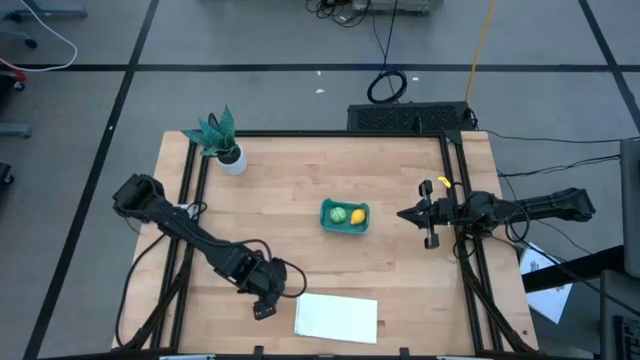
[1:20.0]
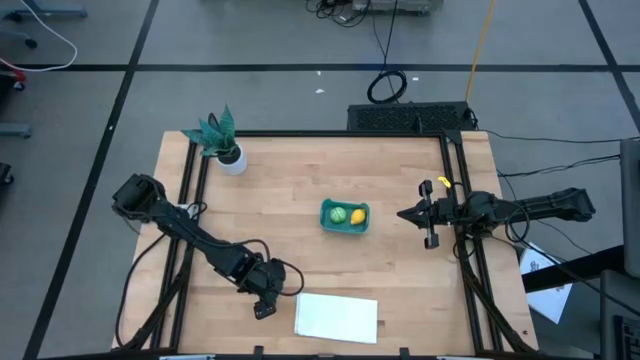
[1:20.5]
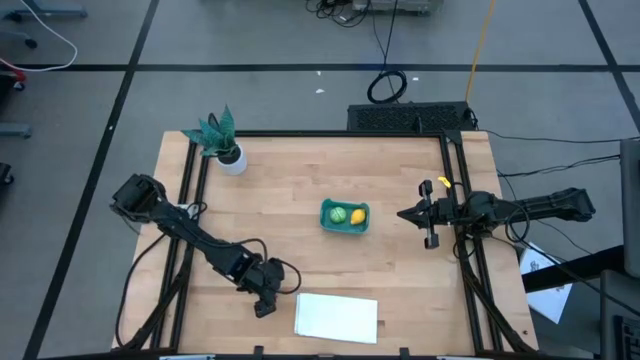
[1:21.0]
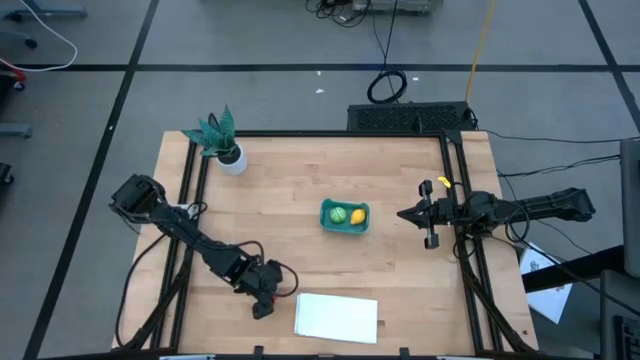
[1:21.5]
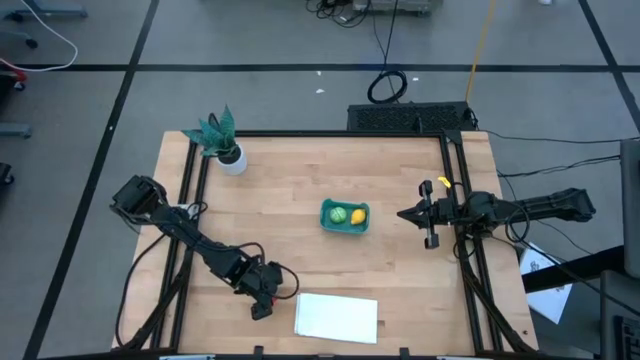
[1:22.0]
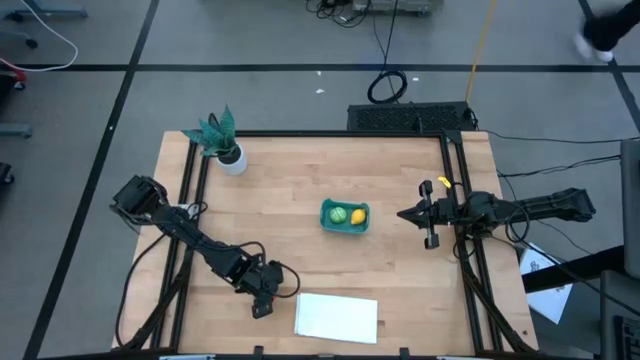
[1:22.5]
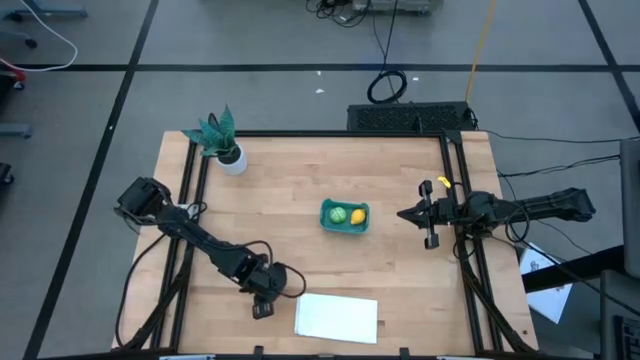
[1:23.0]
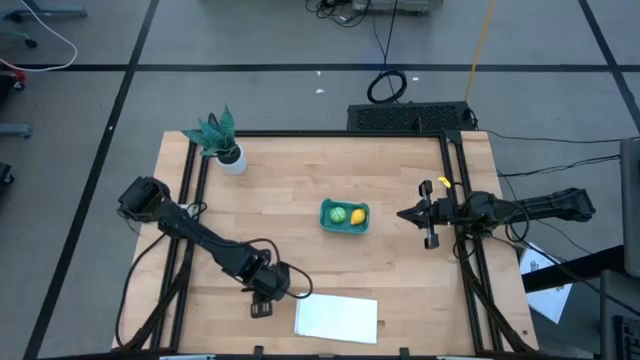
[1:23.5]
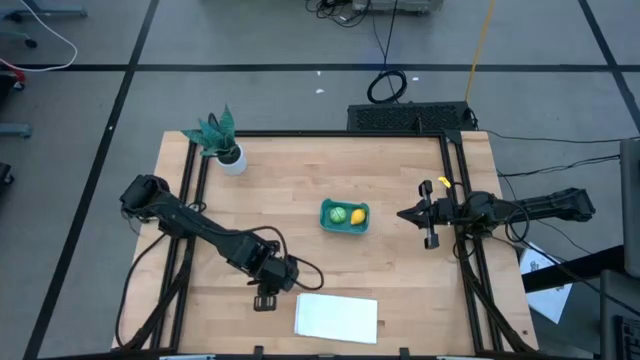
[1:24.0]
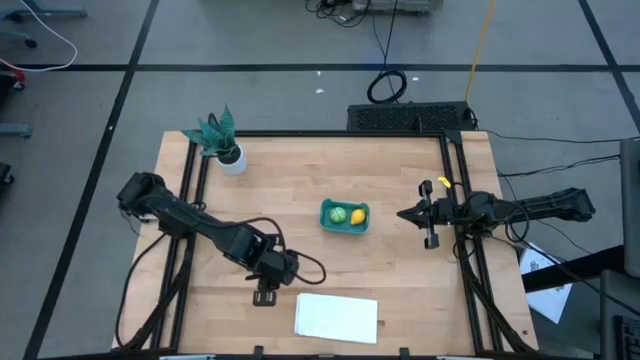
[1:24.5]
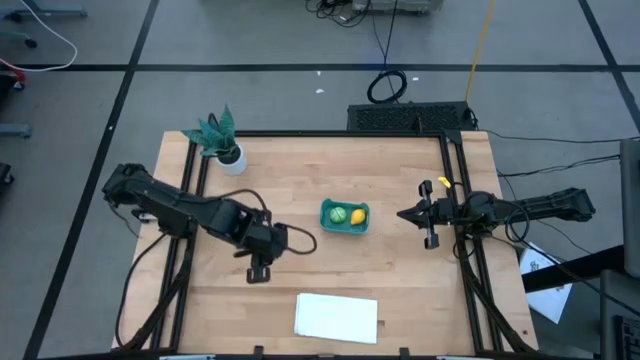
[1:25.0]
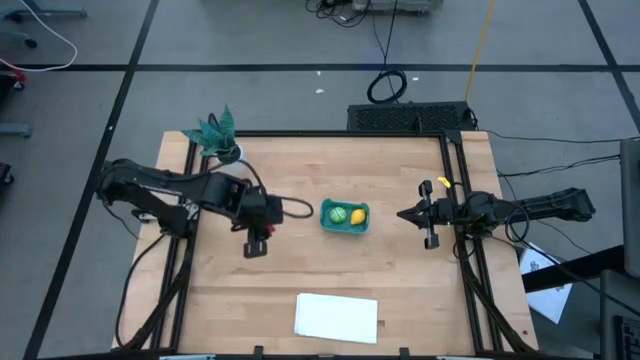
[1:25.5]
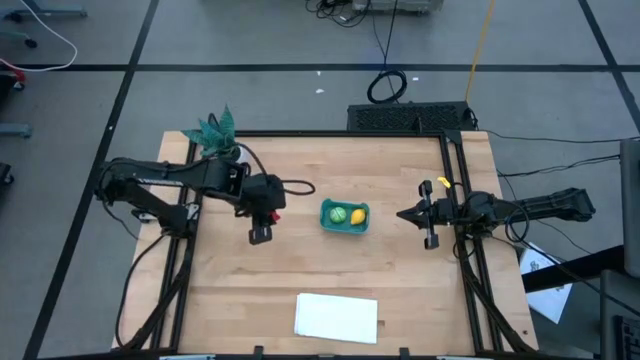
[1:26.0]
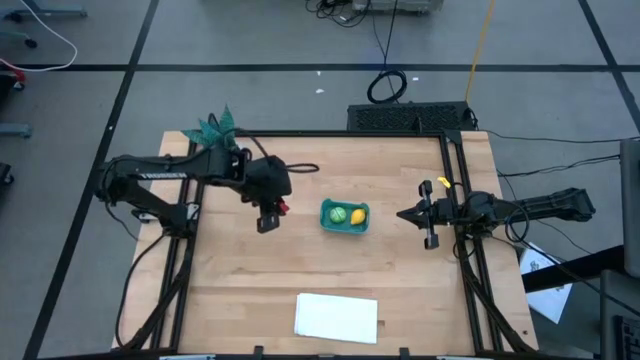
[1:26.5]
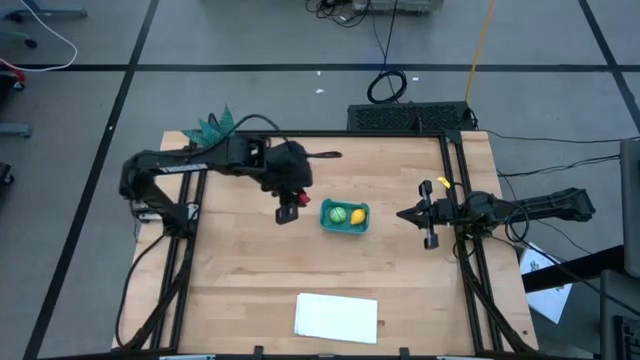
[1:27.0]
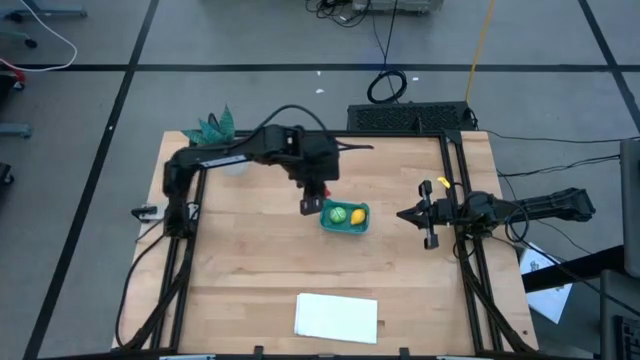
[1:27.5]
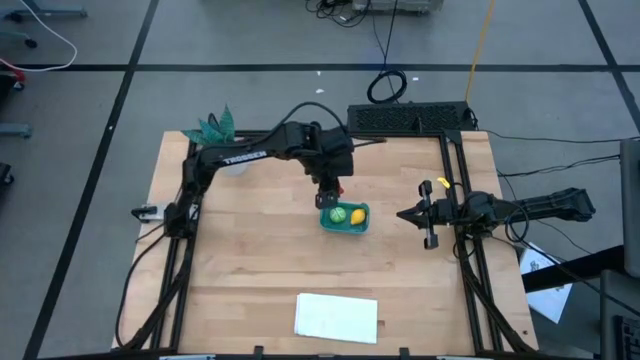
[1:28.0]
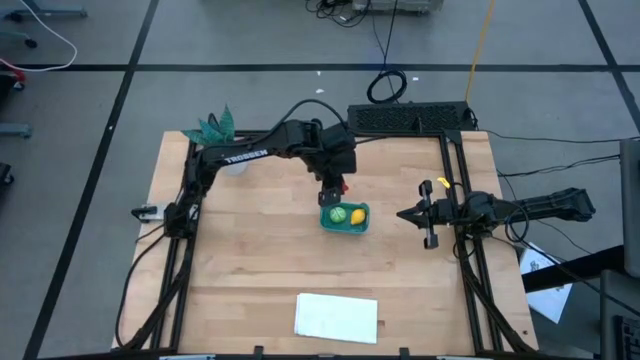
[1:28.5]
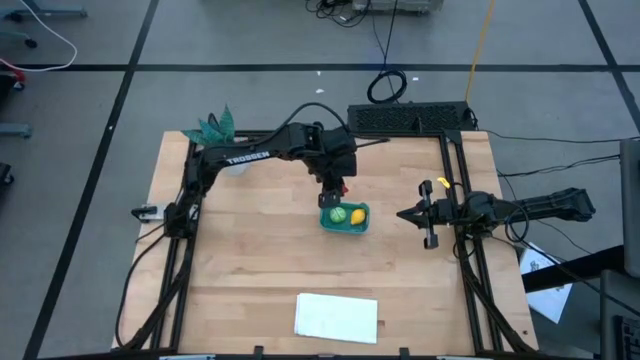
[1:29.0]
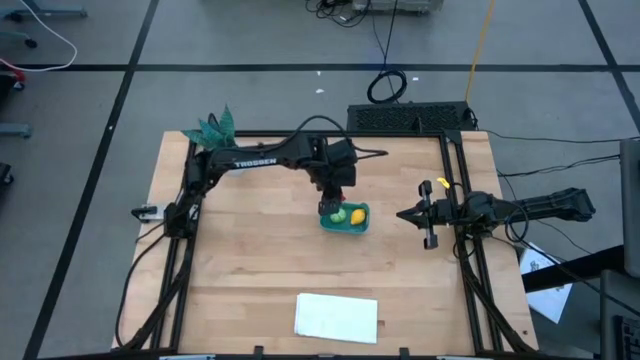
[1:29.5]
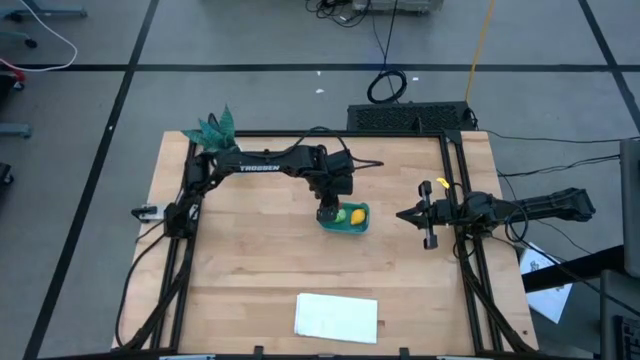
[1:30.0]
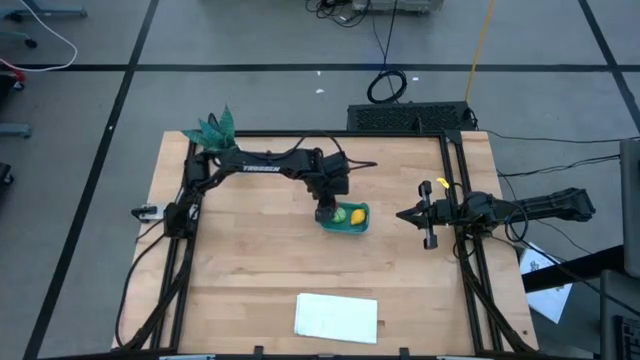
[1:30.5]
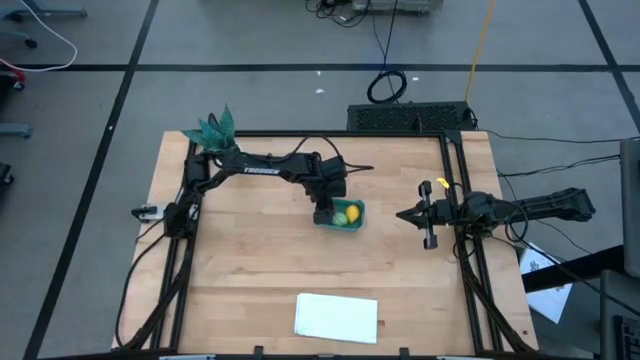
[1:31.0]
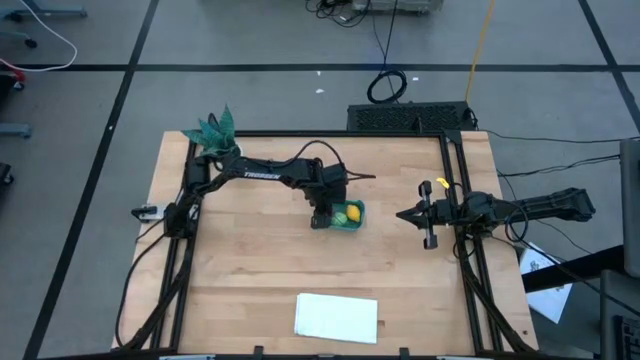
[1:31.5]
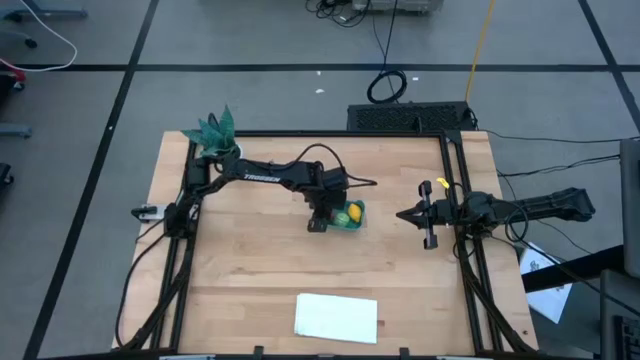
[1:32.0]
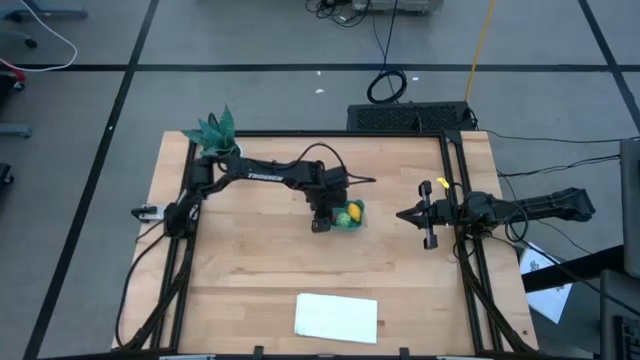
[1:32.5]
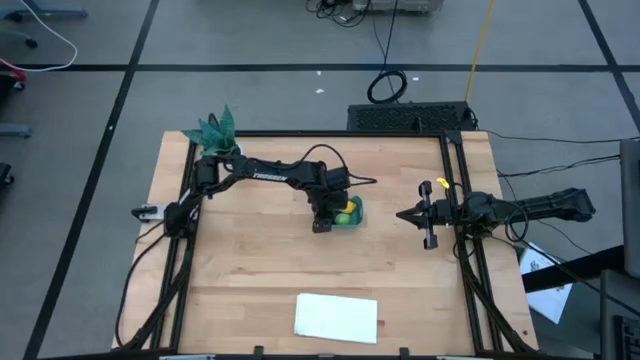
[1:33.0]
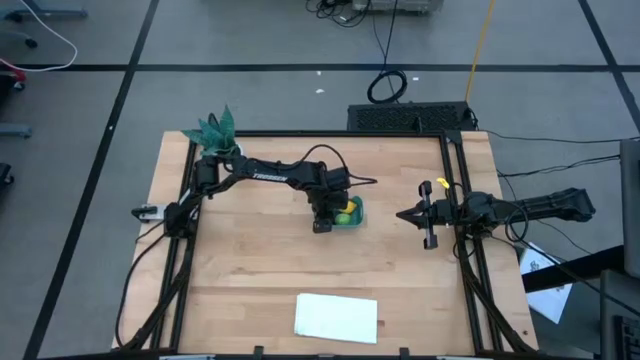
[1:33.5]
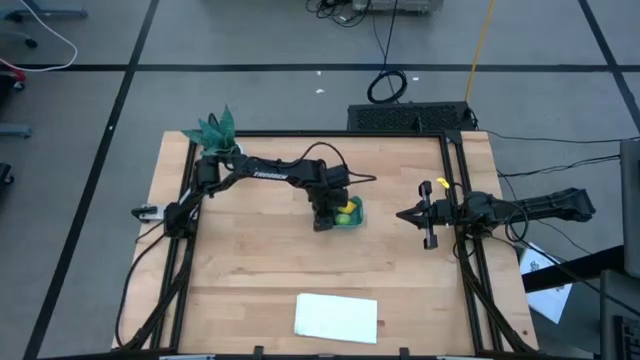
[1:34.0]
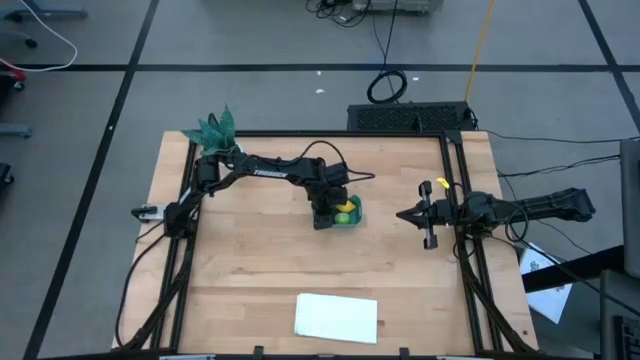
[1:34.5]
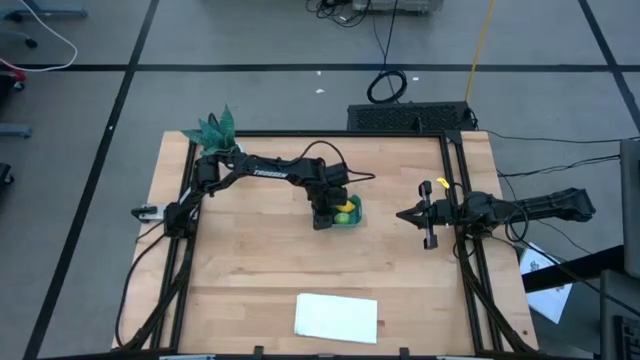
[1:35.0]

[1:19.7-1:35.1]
Task: Pick and placing Produce into tupperware
Put the strawberry into the bin

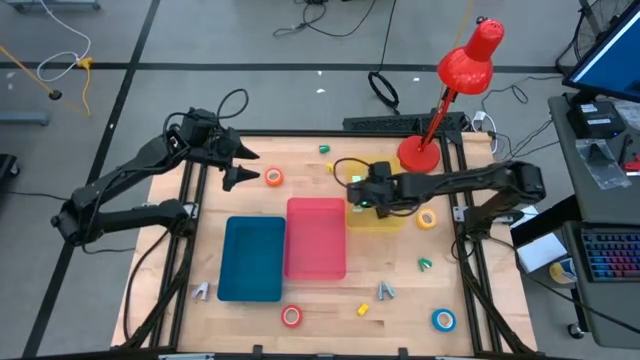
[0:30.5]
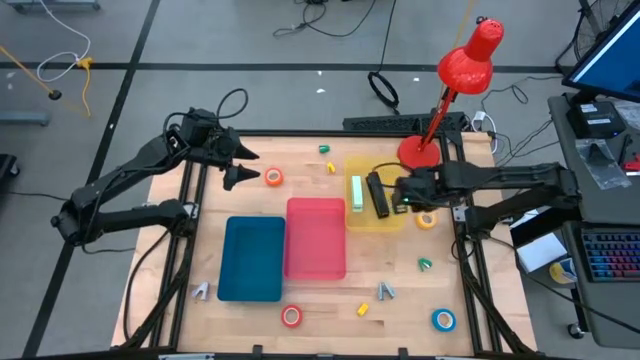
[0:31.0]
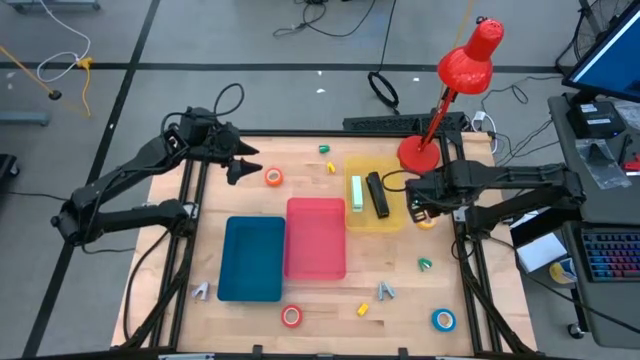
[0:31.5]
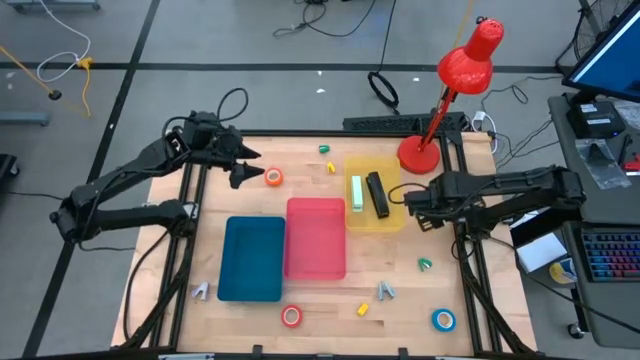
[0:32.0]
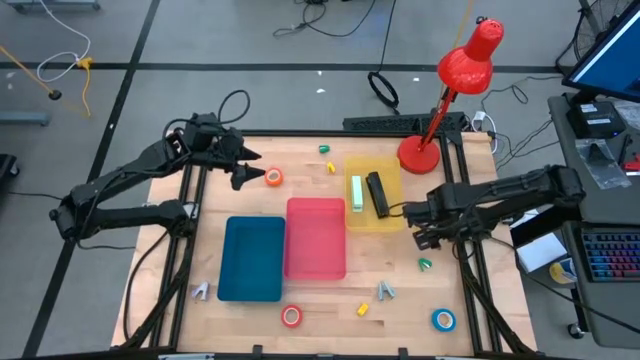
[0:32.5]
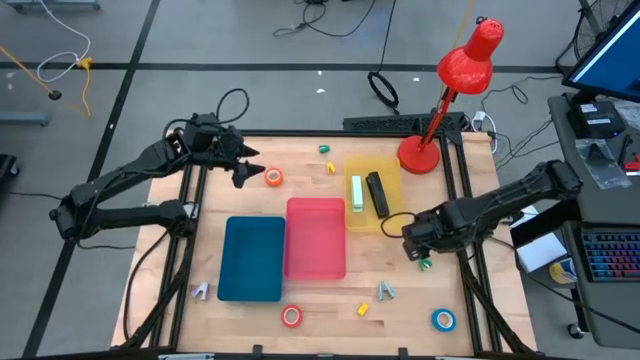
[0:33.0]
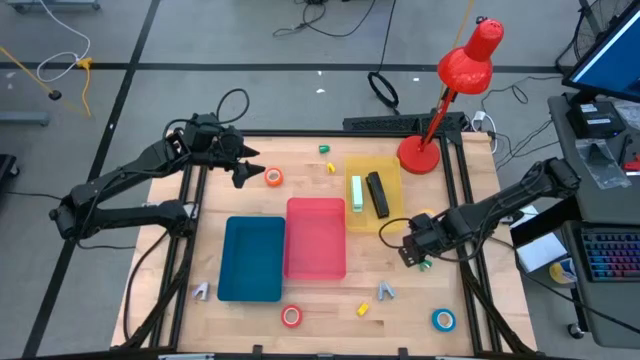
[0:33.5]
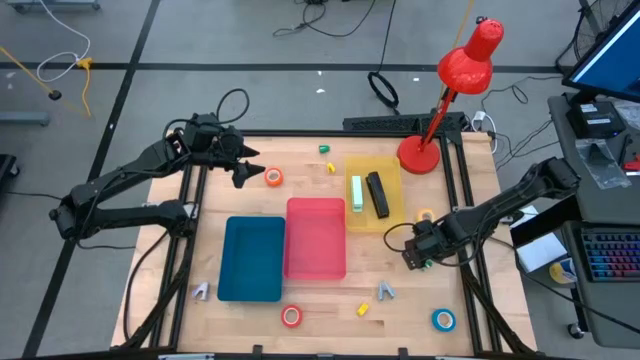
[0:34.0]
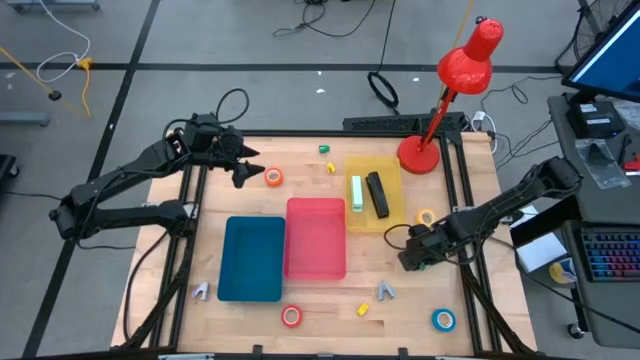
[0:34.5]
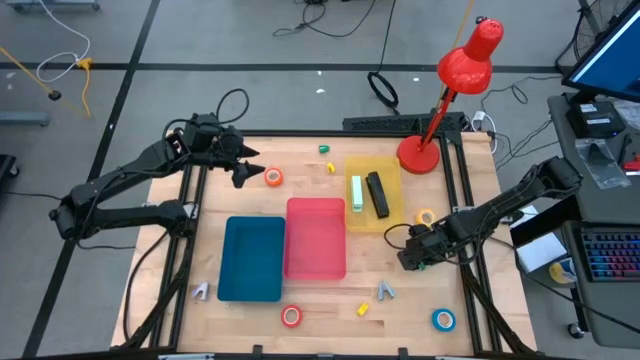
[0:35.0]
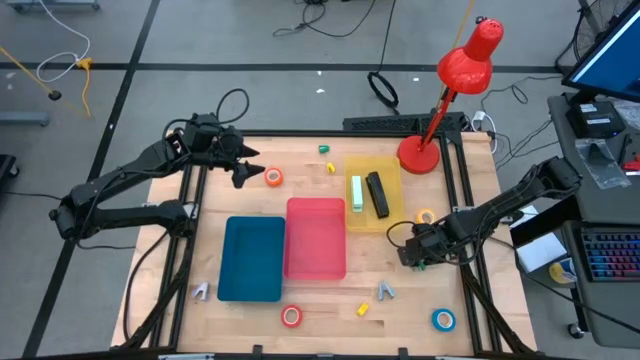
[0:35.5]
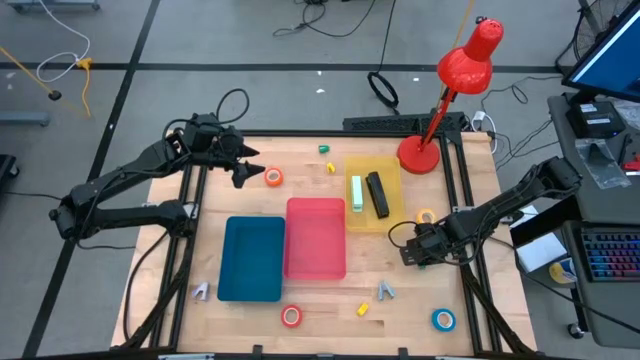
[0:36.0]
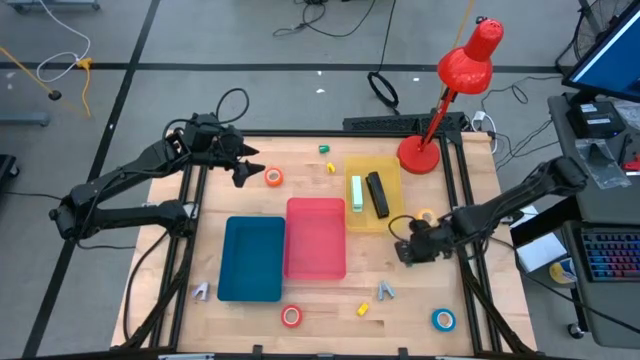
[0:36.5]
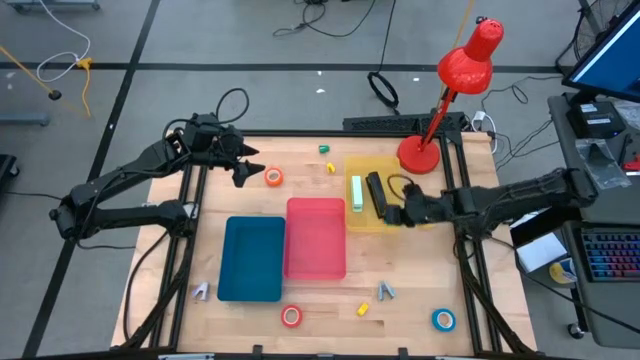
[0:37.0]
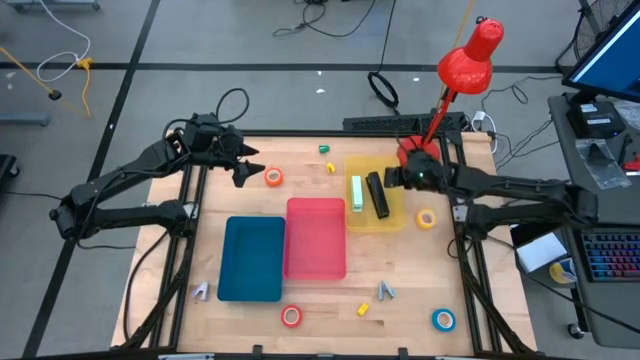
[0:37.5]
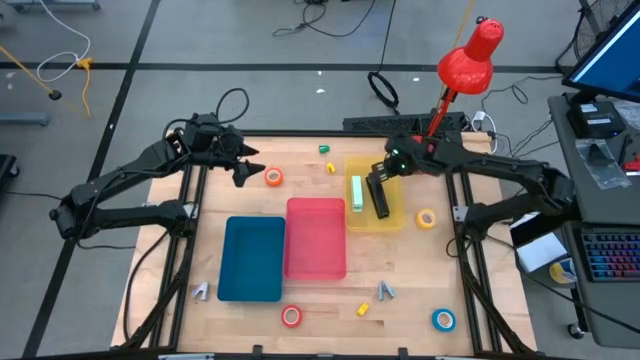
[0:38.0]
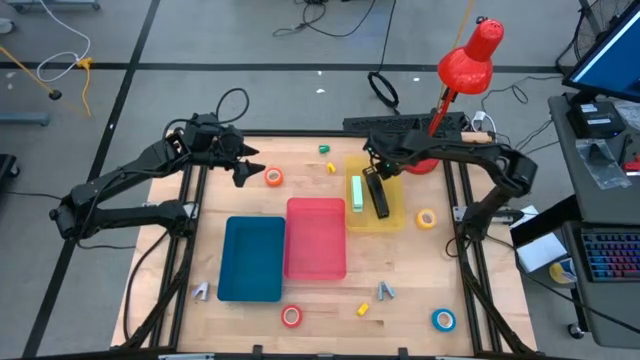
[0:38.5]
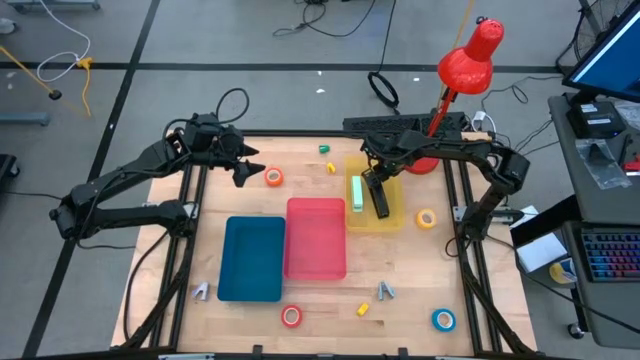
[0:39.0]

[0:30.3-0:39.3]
Task: Pick and place Stapler, Stapler remover, tape
Put the bottom green stapler into the yellow bin
